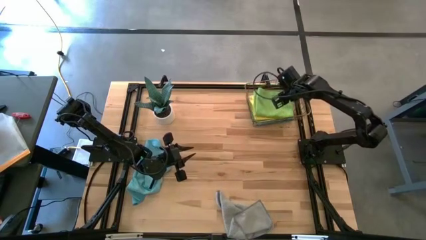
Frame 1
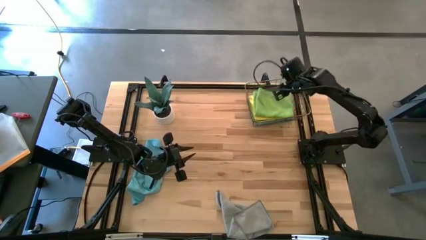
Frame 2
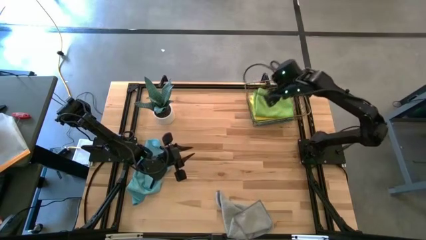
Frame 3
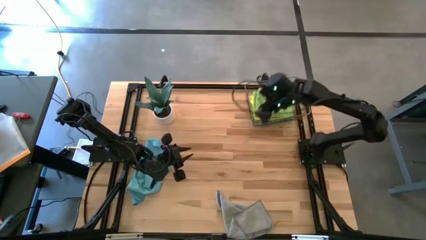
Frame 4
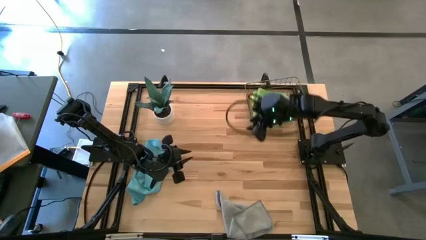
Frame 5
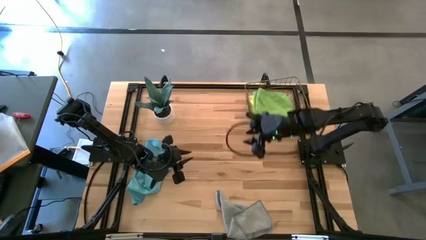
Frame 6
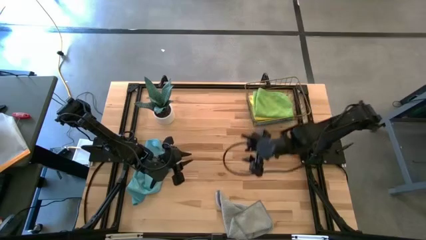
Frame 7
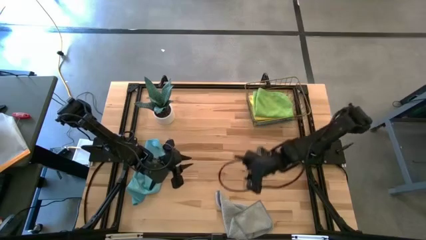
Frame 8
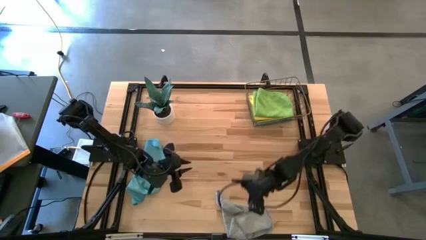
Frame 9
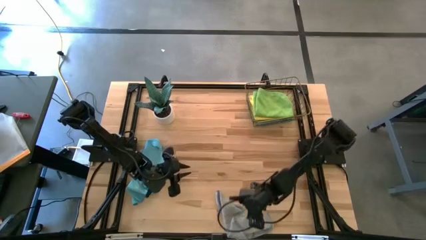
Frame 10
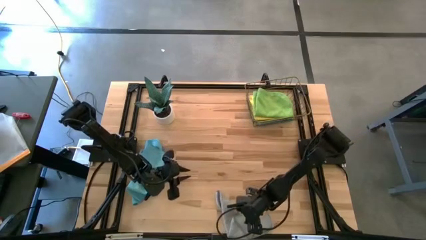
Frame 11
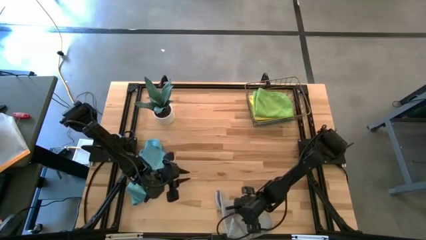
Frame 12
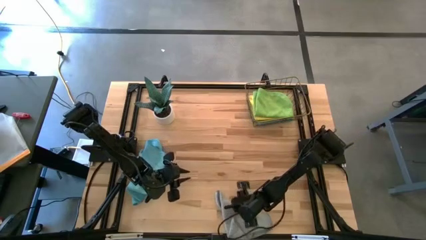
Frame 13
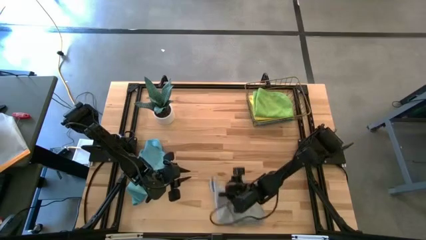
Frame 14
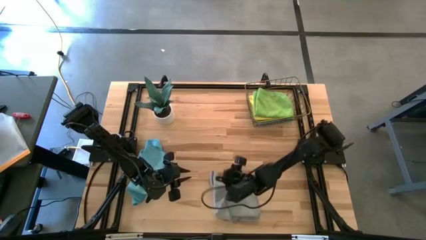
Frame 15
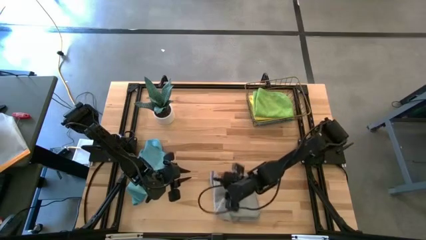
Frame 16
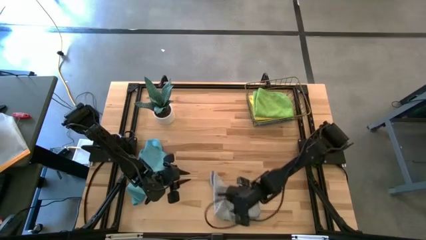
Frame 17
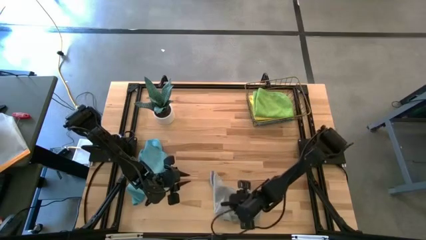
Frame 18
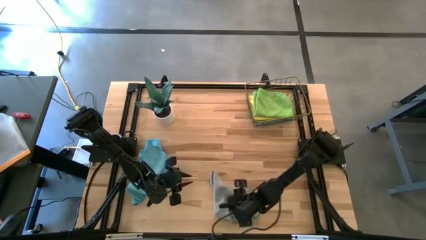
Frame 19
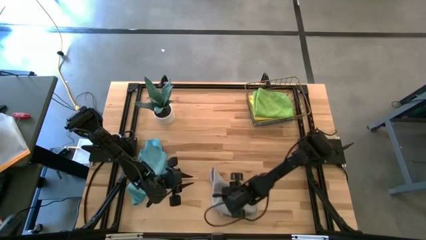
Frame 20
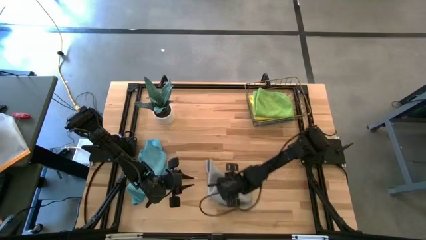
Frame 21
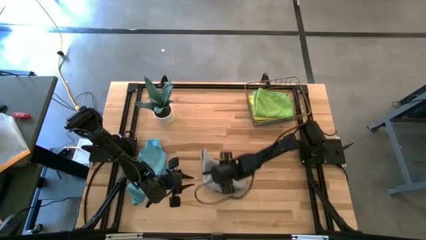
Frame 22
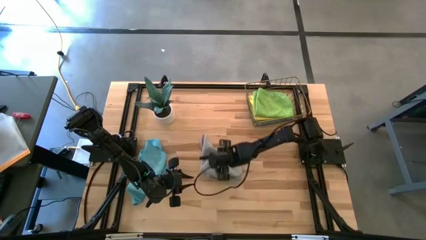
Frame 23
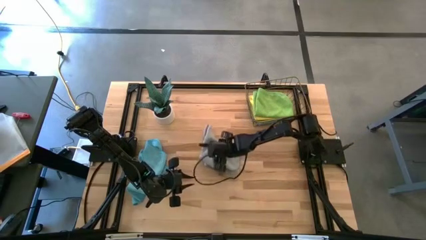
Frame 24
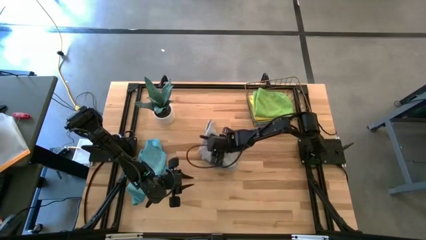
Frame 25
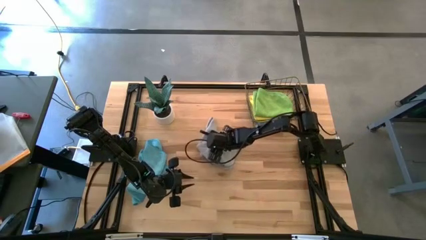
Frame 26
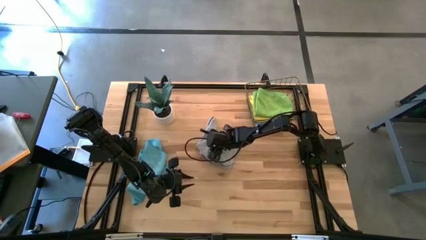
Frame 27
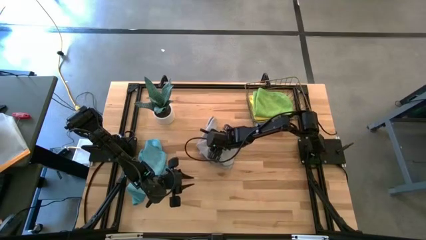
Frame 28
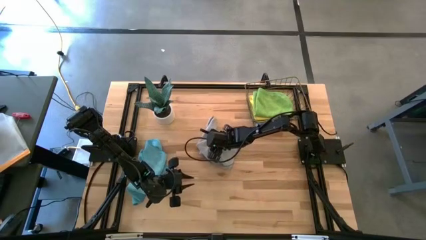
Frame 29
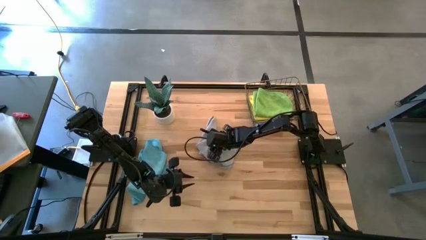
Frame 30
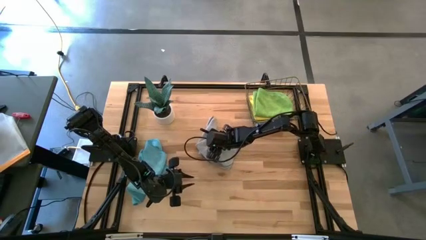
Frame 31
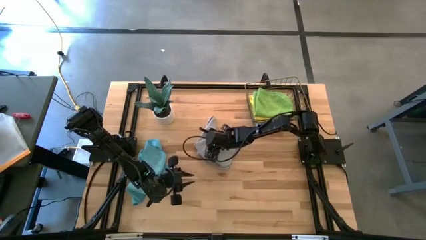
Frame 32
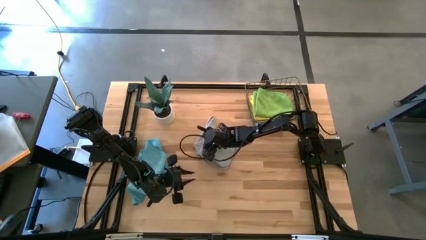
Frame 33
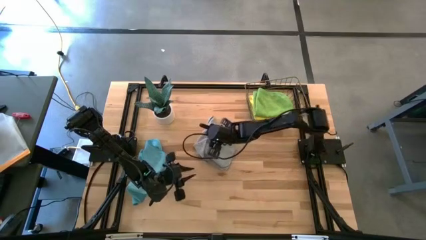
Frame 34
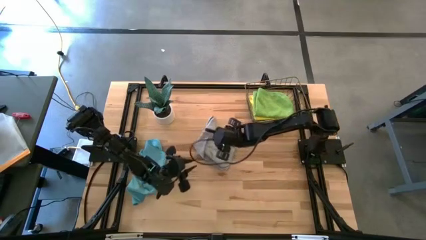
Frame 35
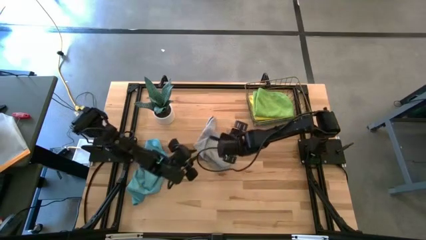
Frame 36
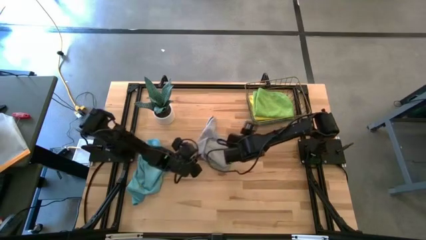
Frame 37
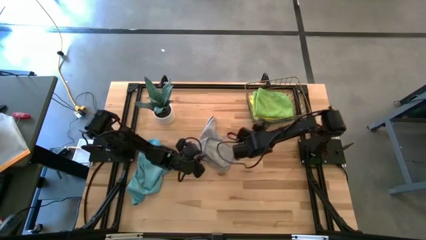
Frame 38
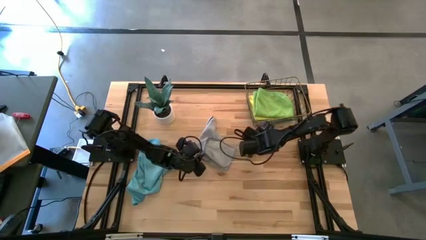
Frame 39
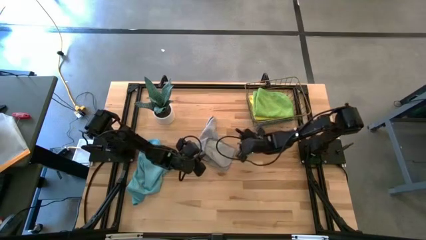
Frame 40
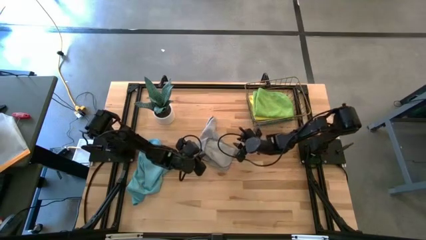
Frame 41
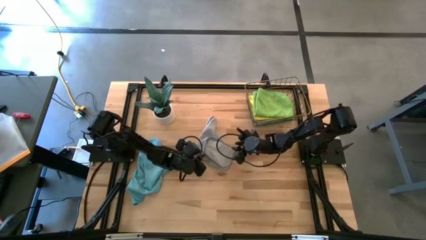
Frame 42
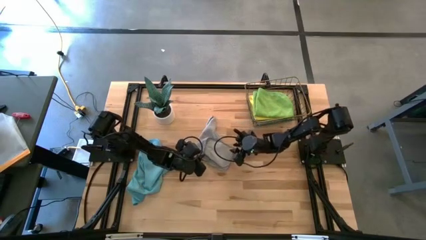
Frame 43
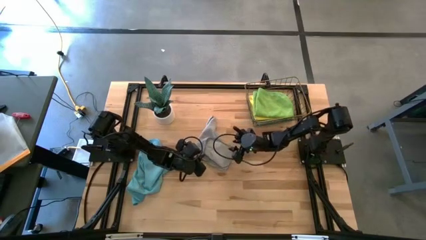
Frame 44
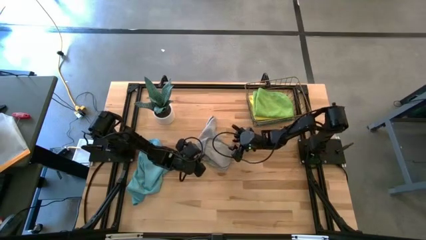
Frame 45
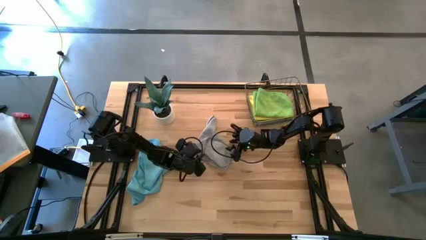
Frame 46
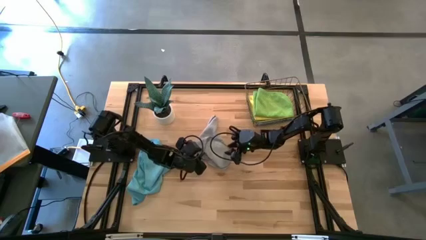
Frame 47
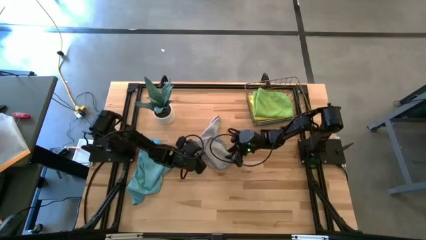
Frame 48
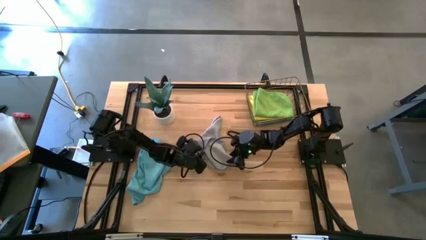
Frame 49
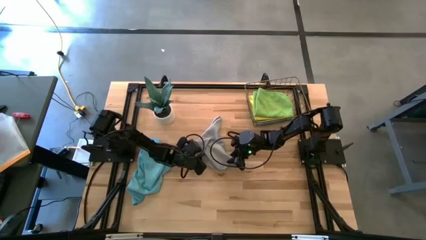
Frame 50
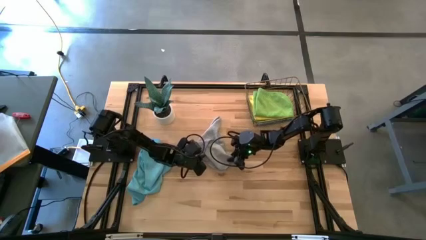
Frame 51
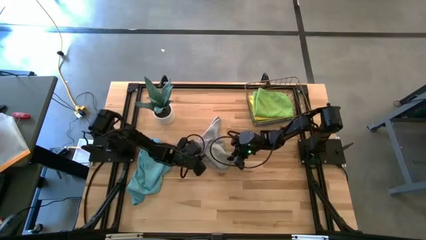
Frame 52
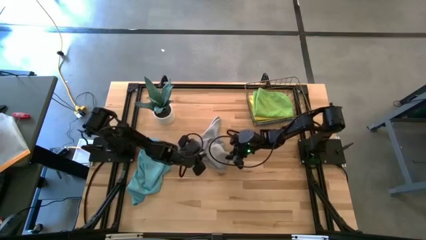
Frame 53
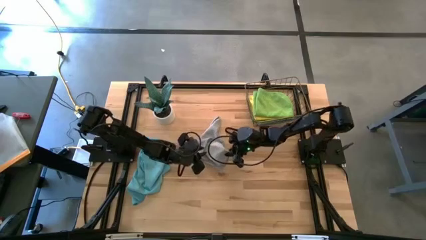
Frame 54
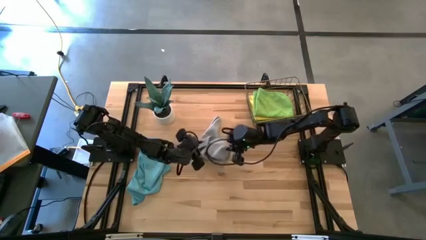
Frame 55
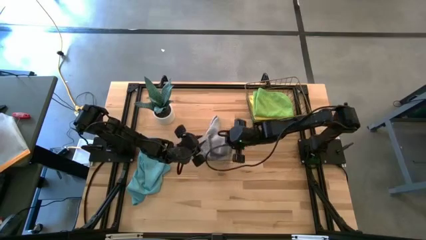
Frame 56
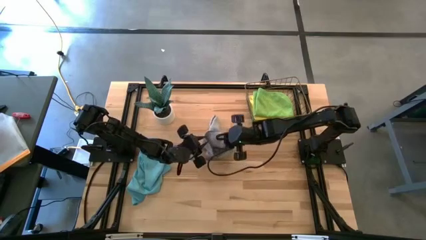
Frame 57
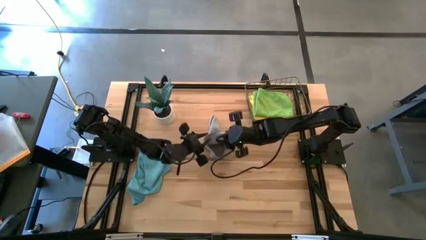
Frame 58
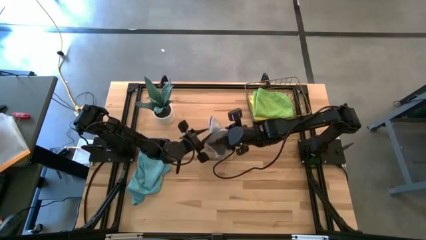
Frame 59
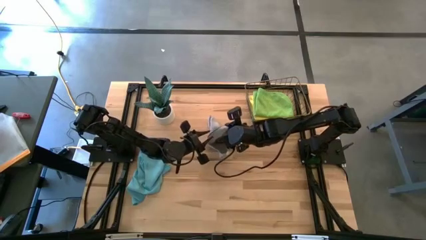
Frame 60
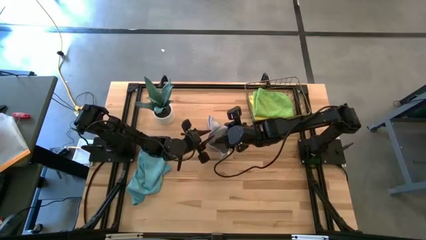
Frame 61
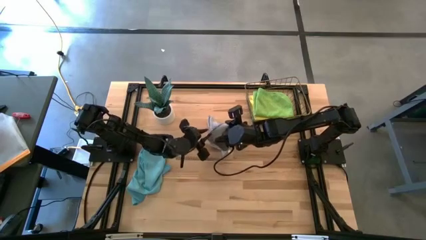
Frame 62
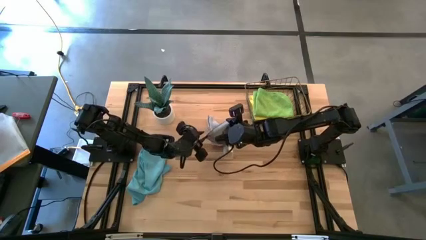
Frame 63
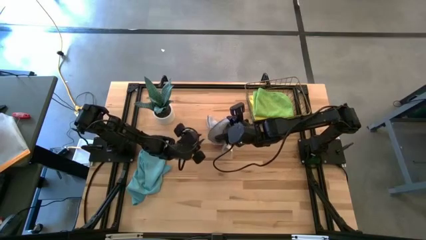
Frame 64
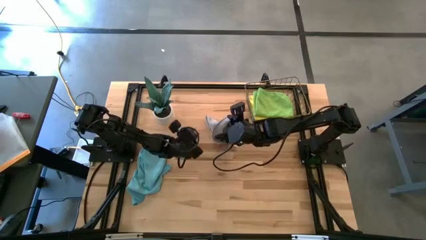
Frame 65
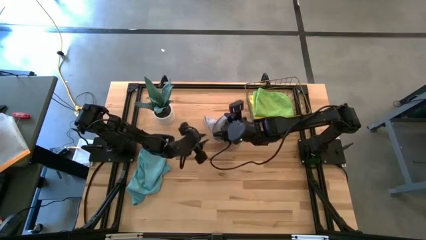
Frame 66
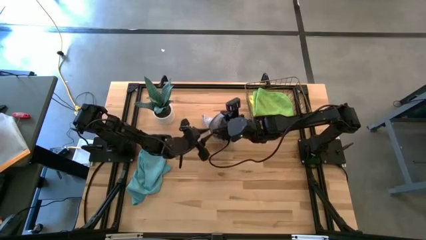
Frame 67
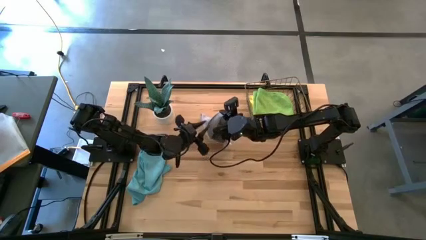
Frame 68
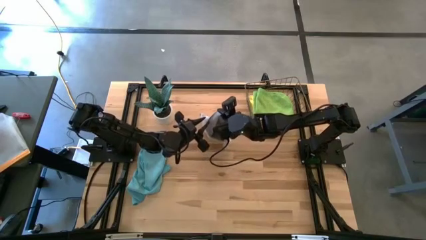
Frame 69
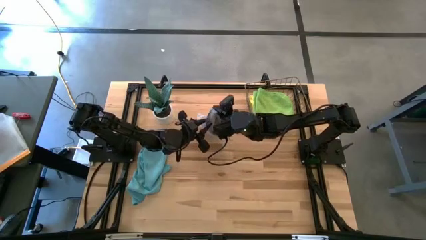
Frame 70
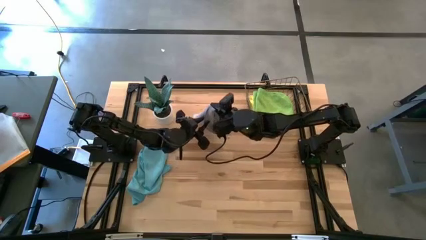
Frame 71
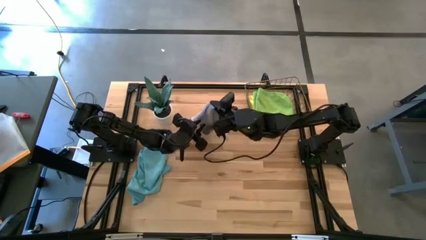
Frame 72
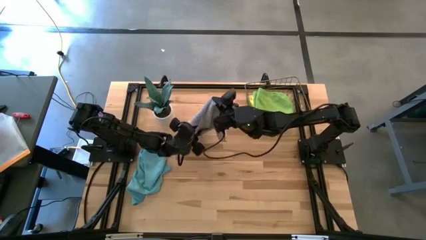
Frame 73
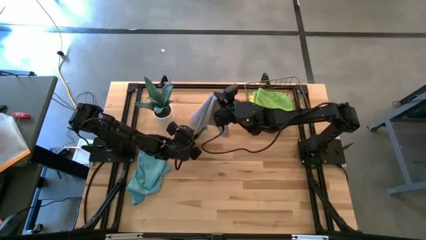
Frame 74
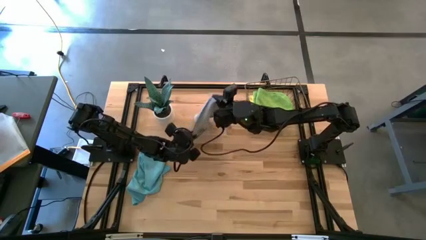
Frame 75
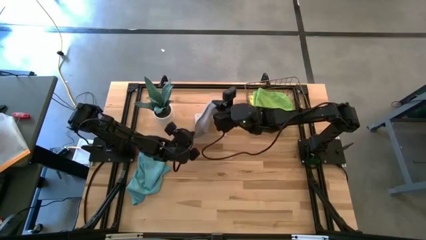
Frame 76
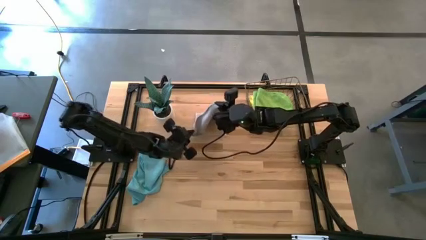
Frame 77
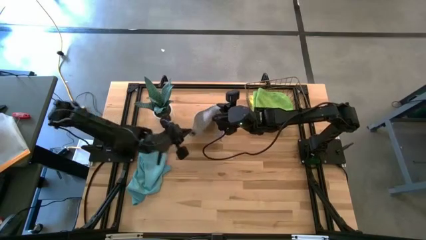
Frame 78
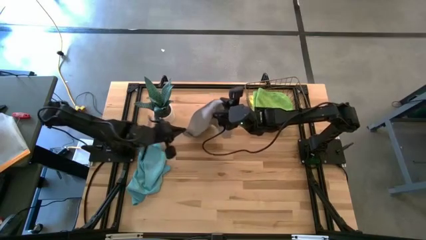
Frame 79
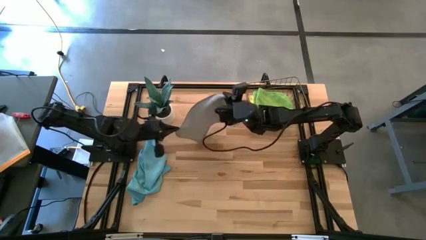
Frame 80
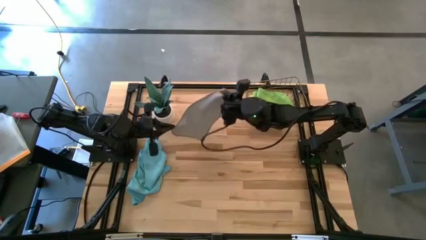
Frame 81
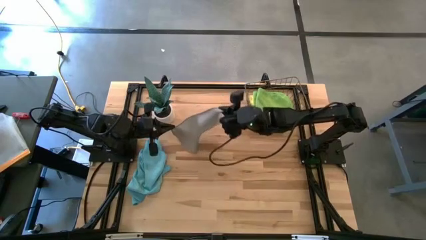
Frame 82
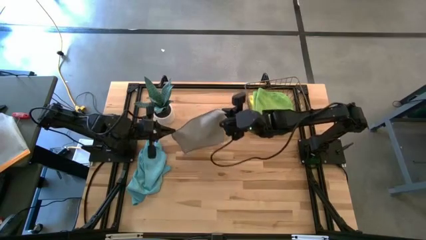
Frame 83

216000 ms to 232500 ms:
Task: Fold microfiber towels
Fold the gray towel
